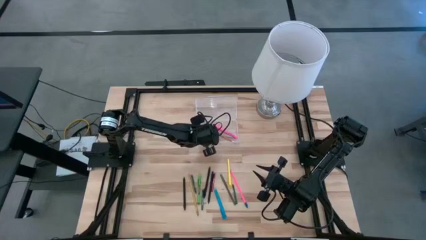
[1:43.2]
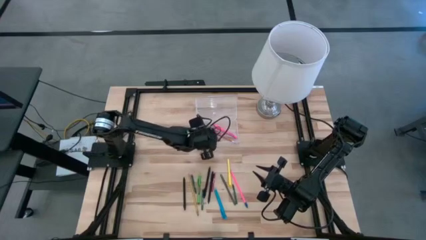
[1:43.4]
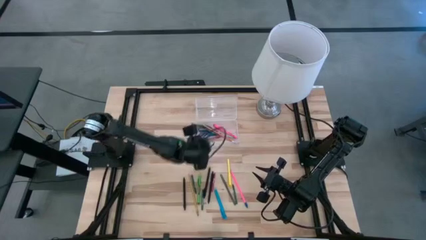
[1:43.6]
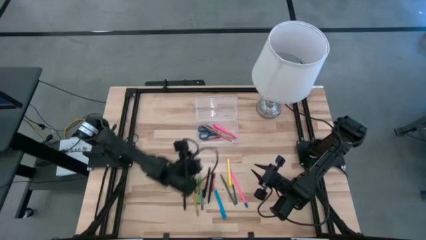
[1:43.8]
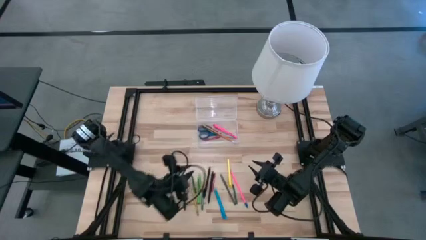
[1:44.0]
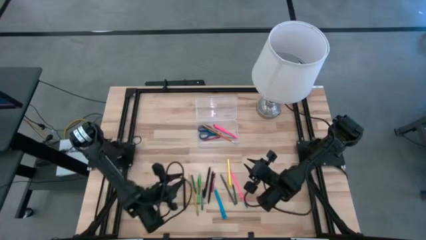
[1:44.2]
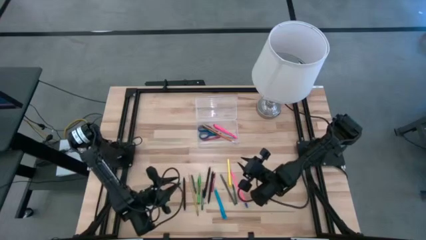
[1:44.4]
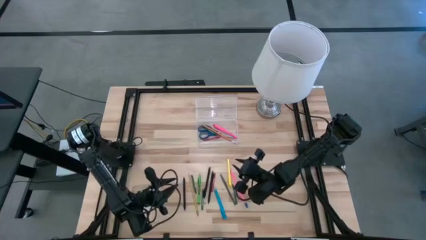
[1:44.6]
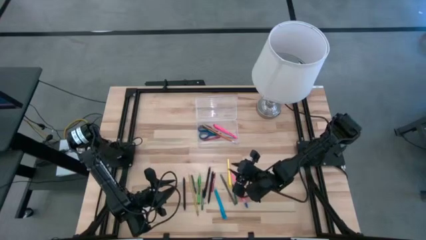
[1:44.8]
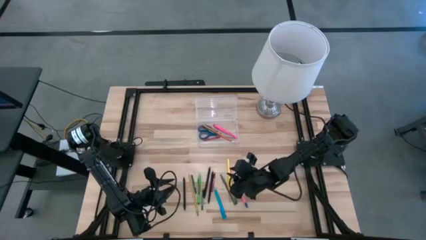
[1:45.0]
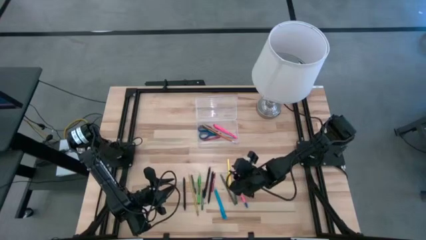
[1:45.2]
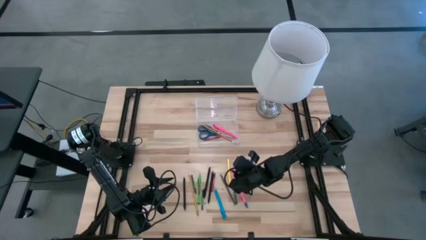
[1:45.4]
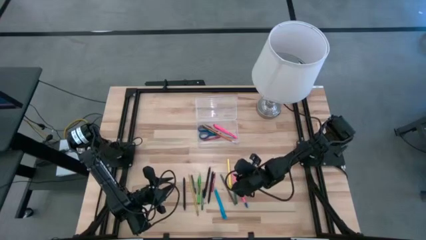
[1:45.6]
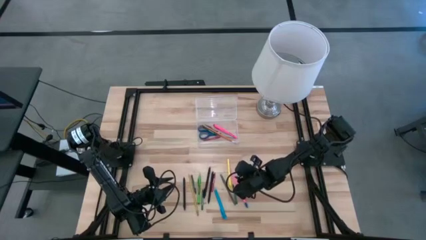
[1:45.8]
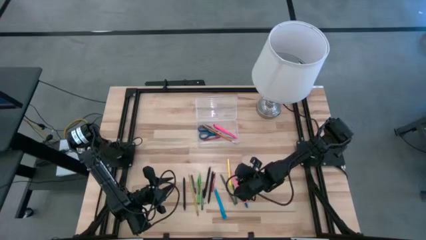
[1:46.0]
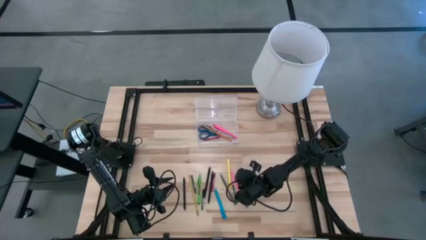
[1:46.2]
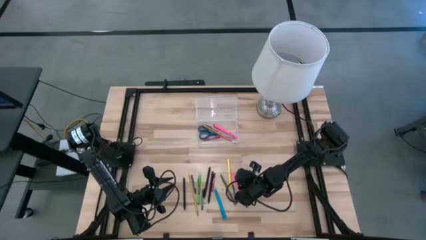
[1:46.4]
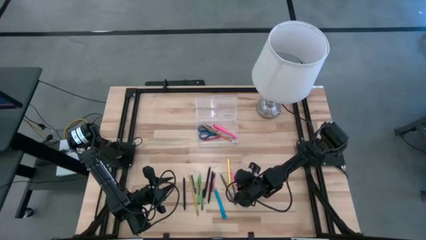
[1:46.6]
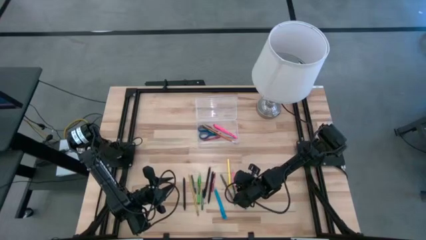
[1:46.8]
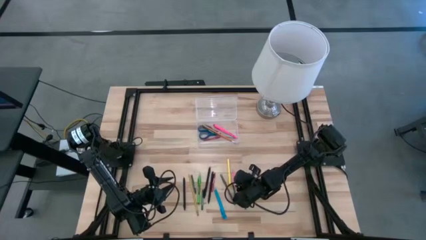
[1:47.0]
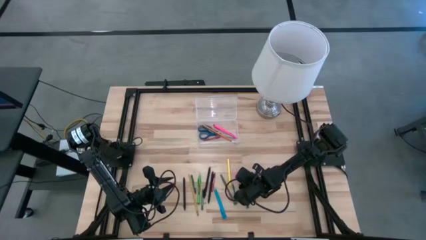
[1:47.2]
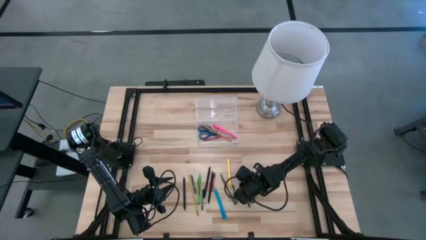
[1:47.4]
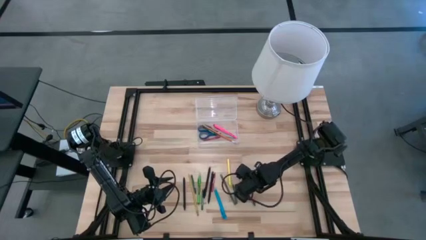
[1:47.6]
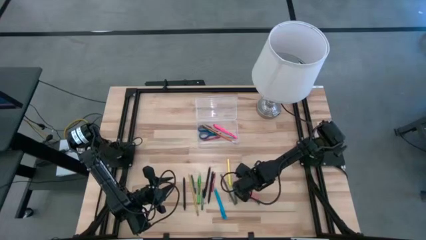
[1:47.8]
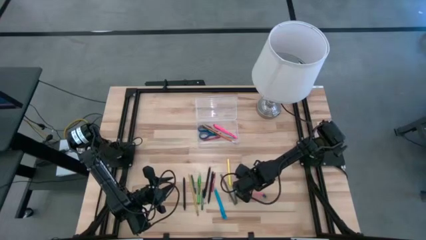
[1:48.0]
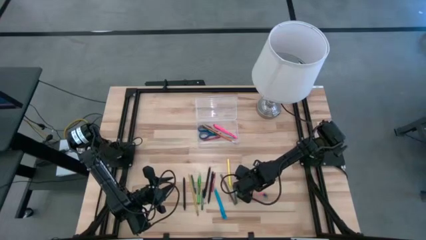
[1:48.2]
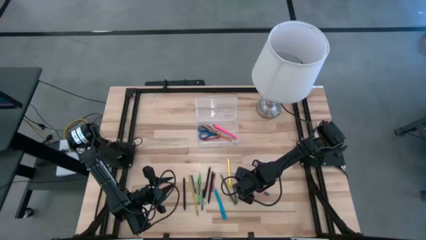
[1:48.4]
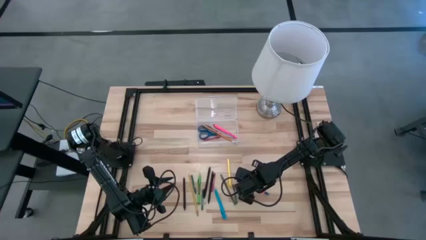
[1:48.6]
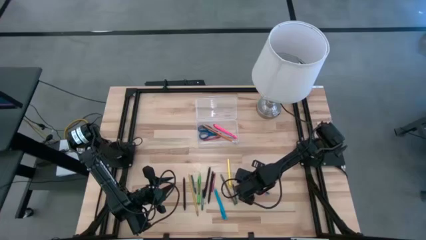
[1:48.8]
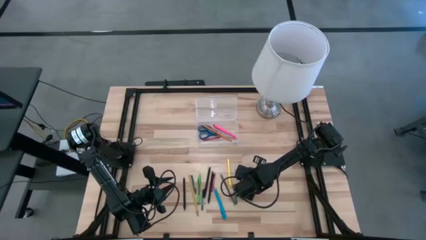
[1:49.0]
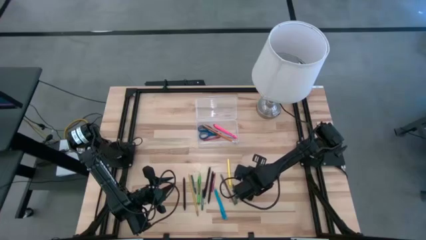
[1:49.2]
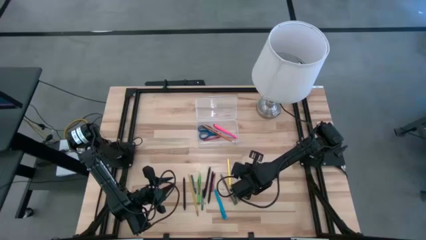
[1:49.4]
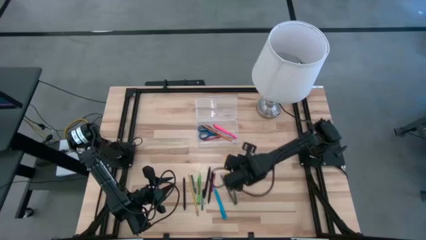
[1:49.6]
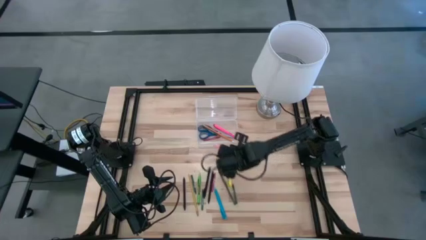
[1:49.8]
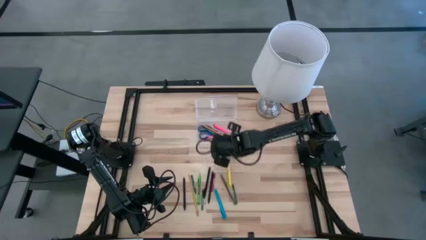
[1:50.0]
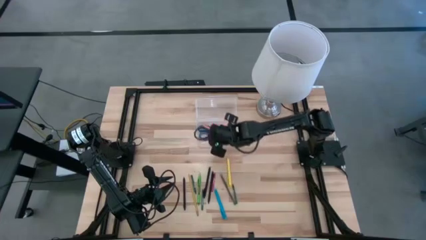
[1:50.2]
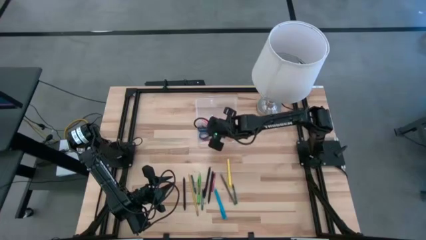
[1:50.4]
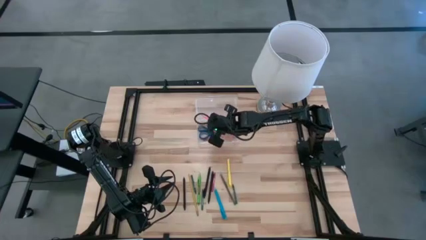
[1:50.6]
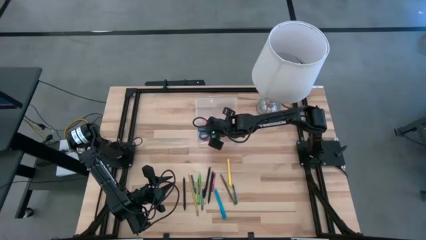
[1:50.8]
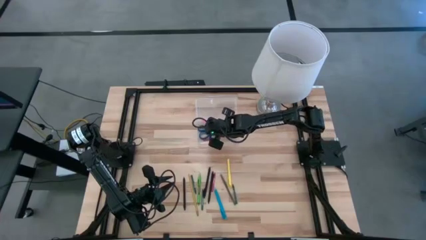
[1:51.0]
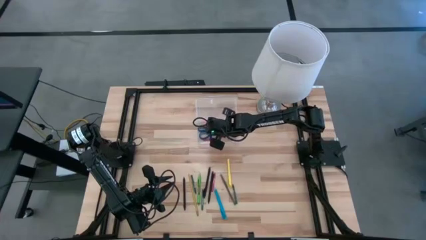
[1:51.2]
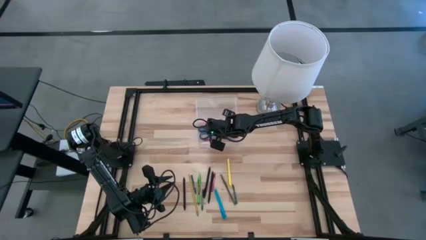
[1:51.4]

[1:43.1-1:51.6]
Task: Pick & place school supplies into a supply box
Put the pink pencil into the supply box

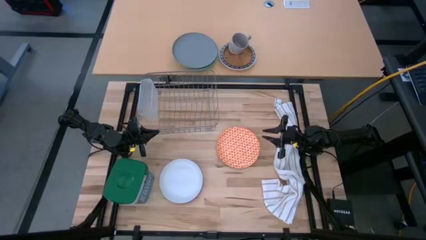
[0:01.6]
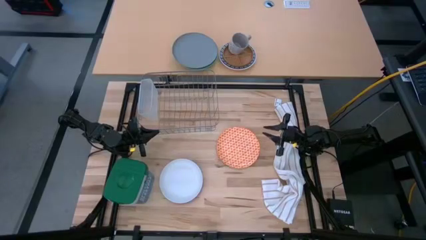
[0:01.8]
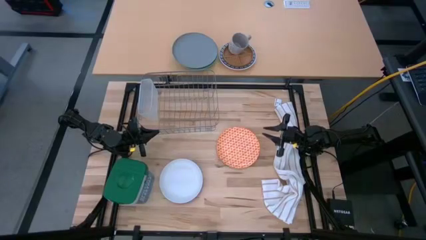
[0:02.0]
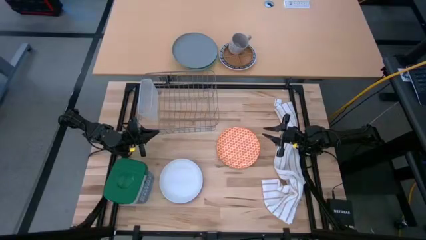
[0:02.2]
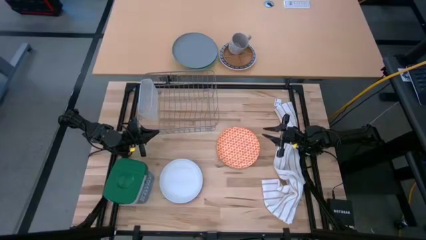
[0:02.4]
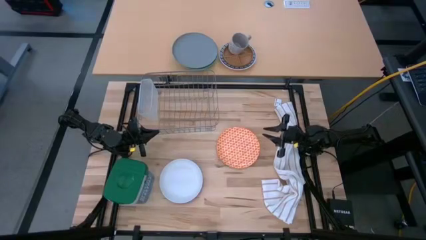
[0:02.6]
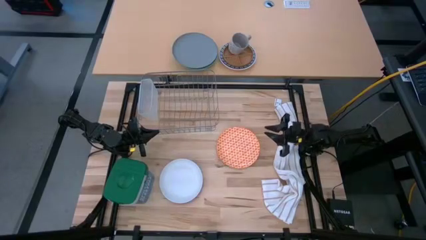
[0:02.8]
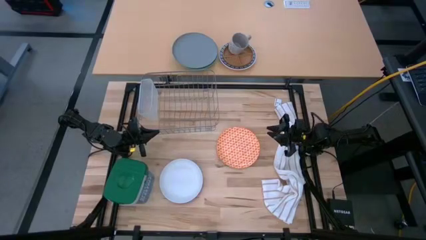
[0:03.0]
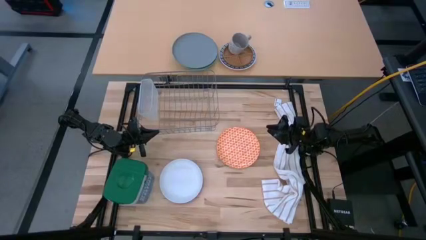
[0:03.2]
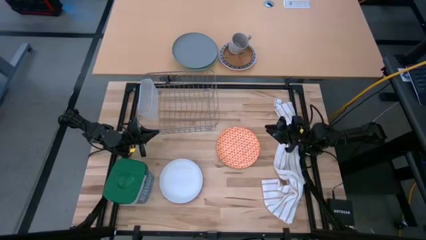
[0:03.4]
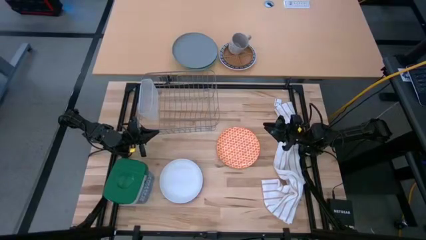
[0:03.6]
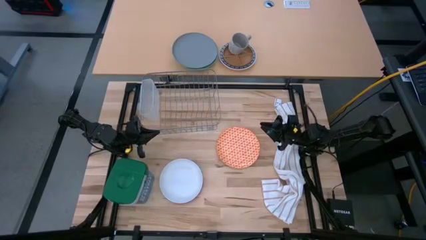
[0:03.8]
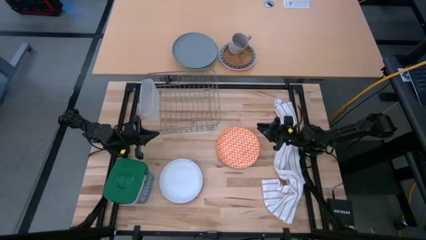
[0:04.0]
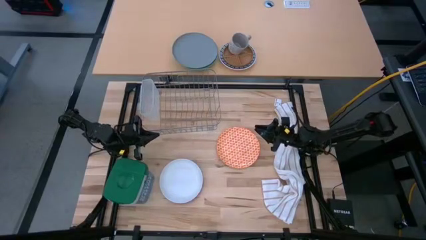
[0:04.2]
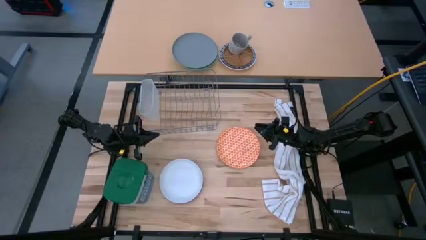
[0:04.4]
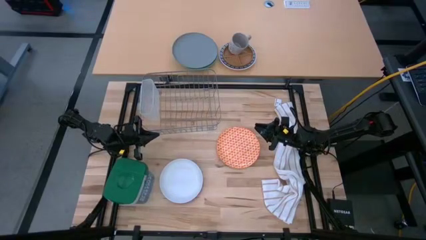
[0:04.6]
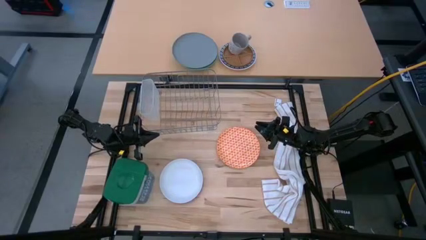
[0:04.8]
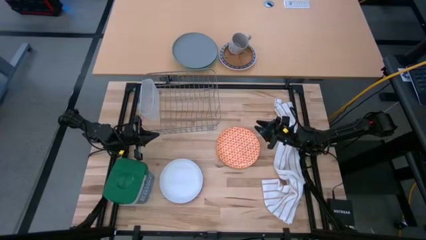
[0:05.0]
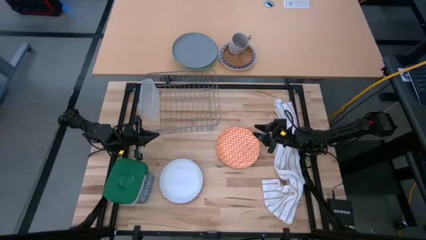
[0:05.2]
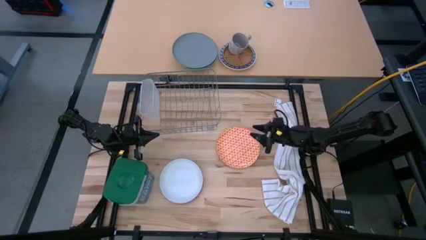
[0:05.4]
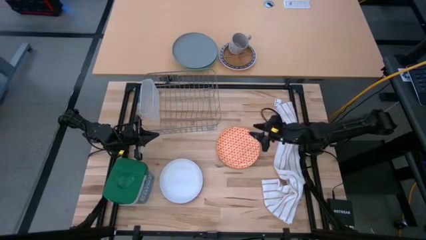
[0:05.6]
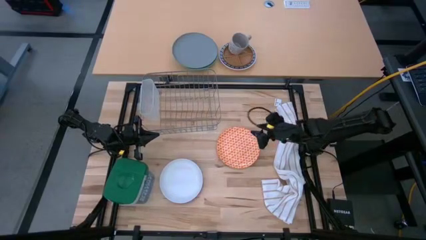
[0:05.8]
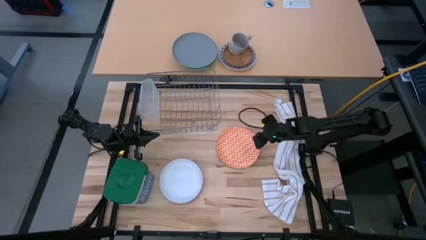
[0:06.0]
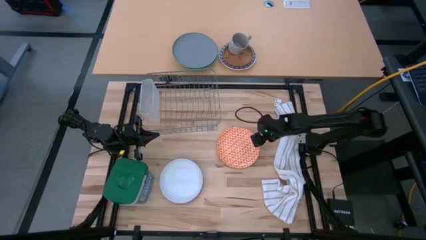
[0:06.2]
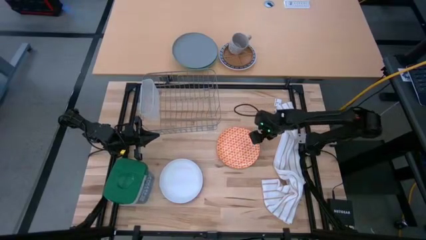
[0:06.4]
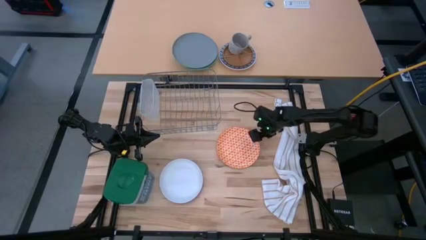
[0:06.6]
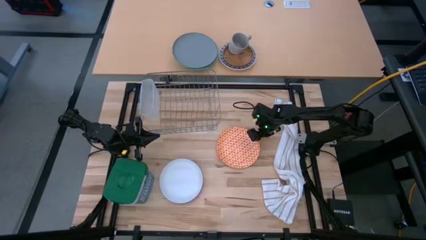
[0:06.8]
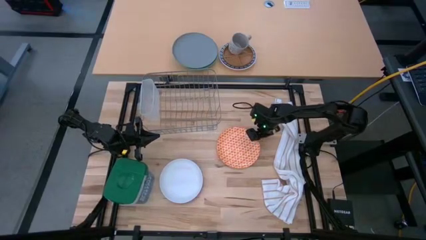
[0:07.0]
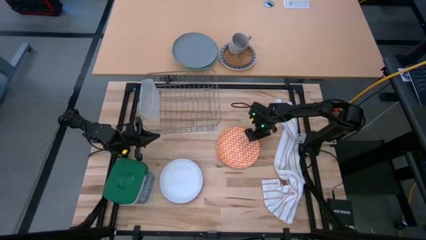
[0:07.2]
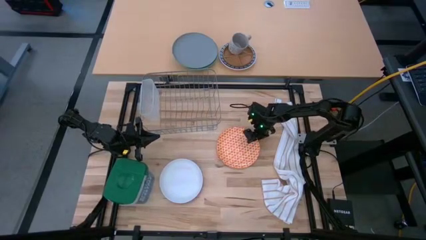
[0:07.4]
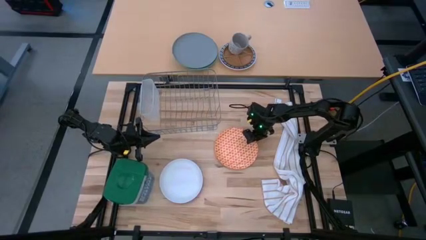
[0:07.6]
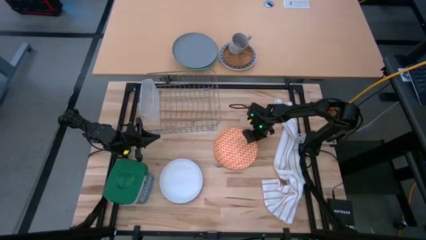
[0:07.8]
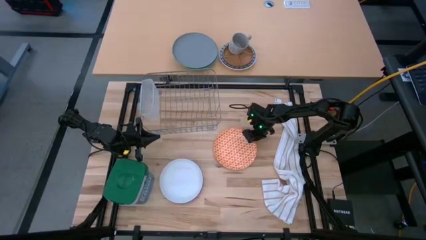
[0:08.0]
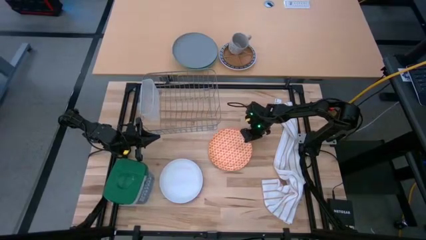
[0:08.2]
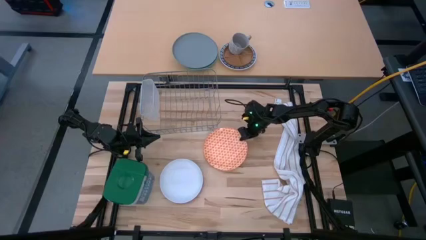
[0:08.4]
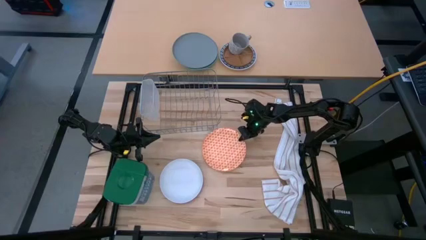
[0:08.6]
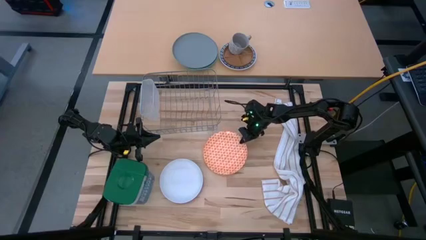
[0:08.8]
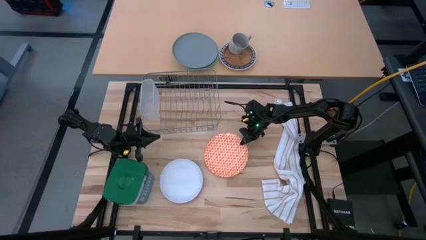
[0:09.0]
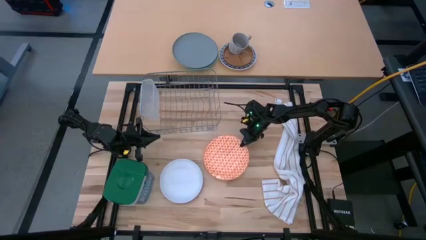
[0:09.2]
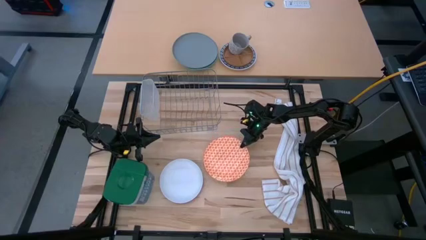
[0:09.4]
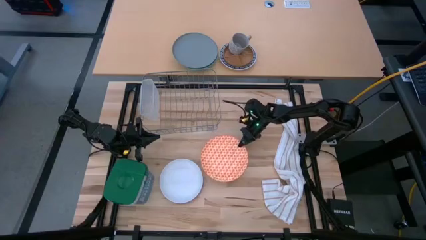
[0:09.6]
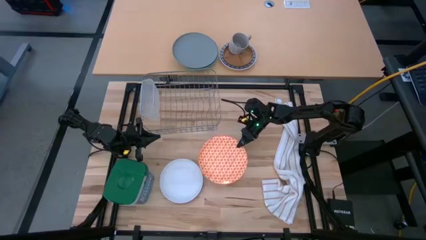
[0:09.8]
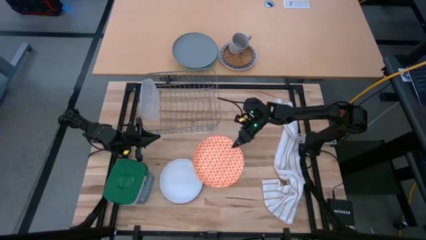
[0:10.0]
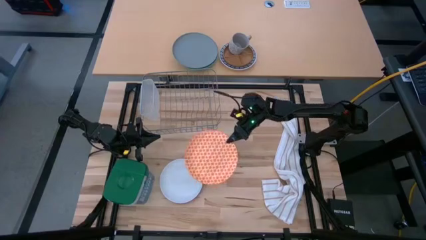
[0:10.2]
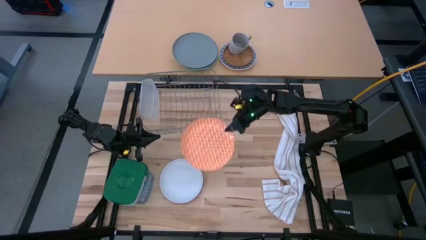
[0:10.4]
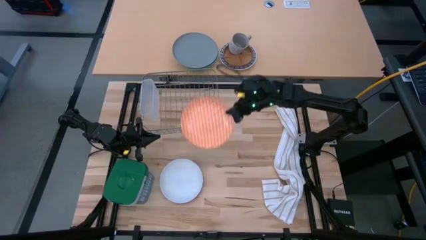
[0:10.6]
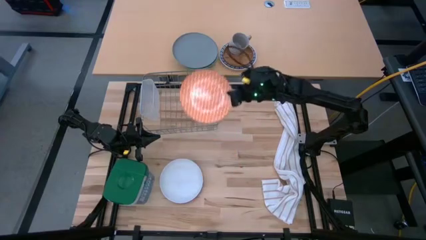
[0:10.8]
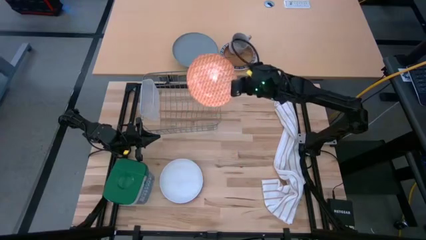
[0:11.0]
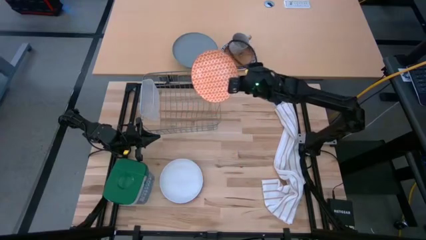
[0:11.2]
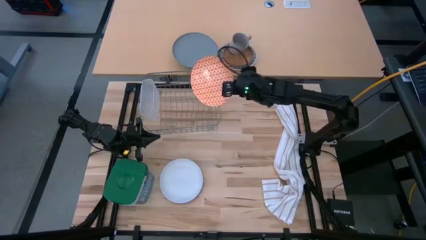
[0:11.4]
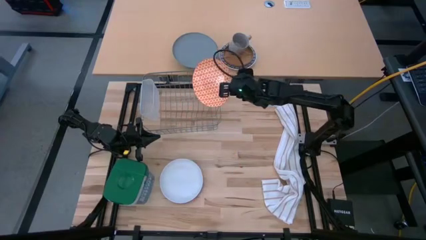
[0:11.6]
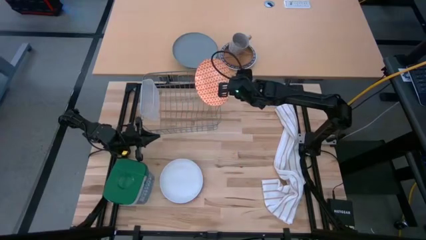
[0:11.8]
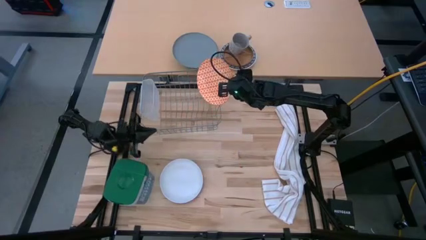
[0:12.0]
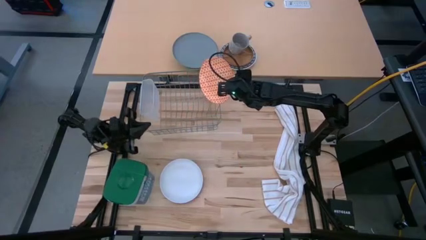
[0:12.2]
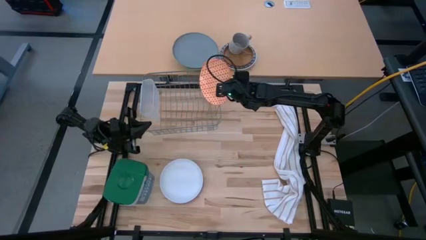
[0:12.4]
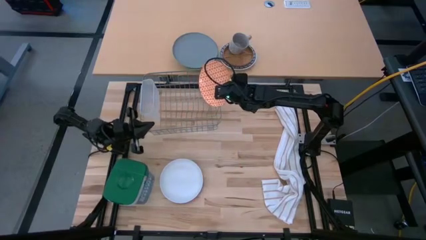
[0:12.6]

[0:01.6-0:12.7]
Task: Sort dishes
Put the orange patterned plate into the dish rack
